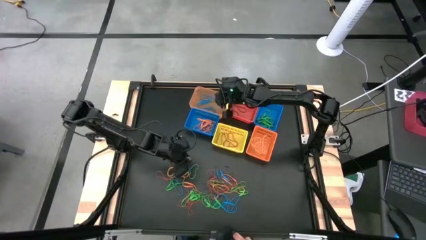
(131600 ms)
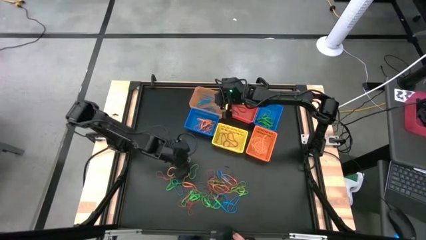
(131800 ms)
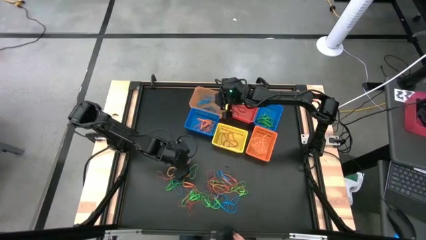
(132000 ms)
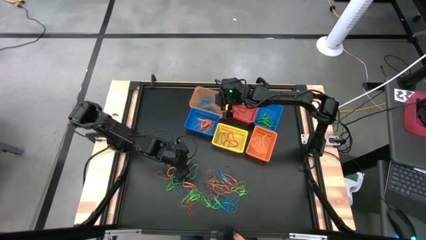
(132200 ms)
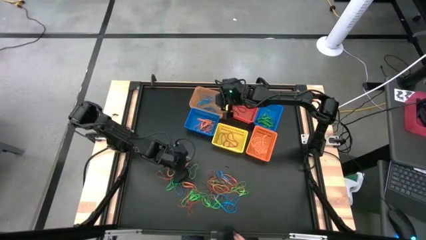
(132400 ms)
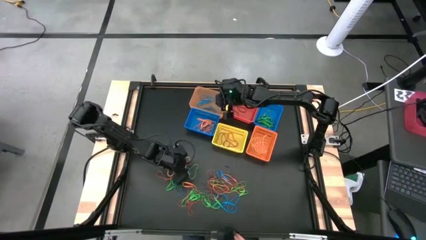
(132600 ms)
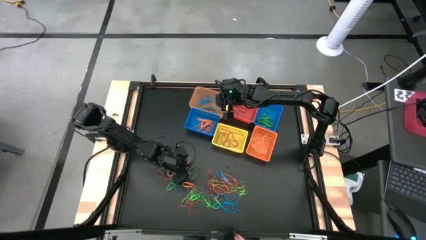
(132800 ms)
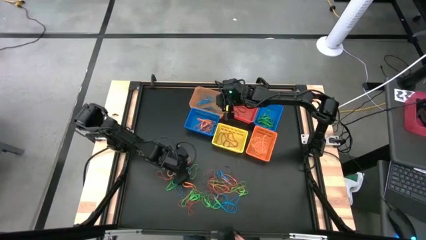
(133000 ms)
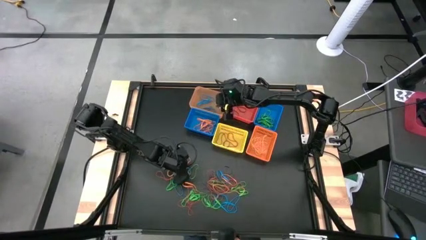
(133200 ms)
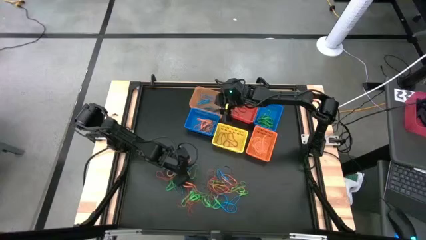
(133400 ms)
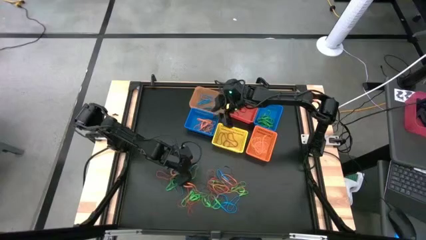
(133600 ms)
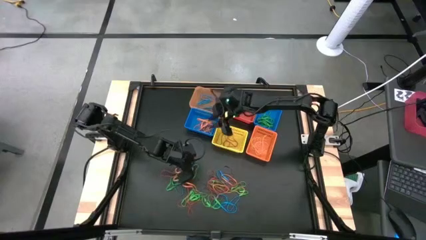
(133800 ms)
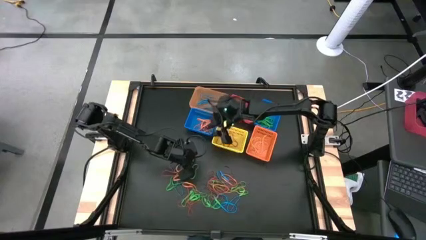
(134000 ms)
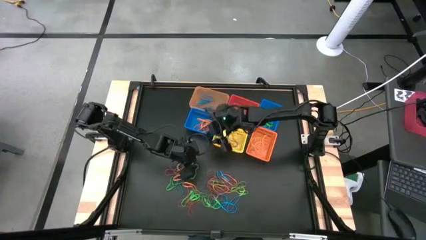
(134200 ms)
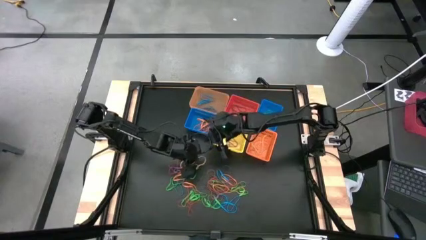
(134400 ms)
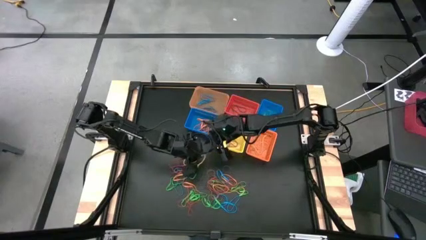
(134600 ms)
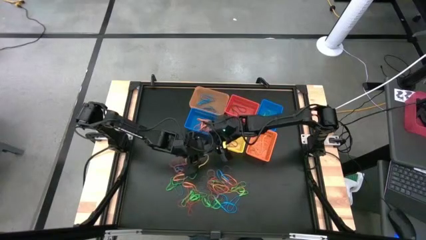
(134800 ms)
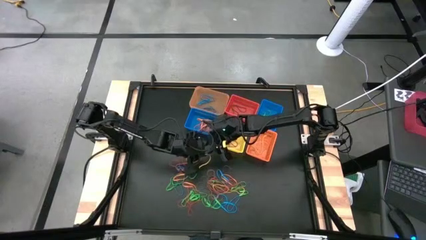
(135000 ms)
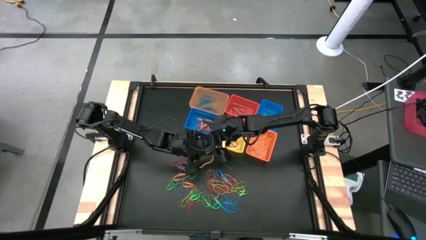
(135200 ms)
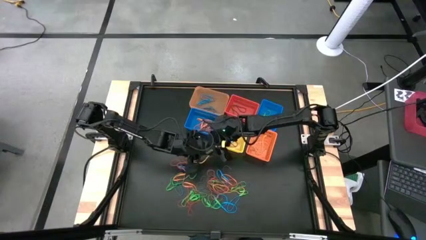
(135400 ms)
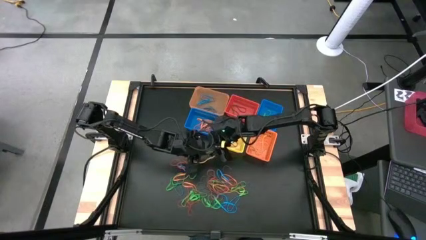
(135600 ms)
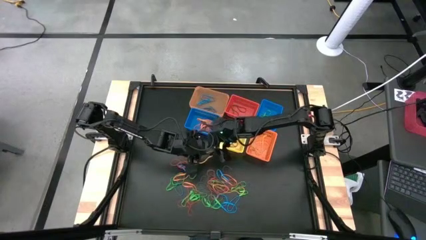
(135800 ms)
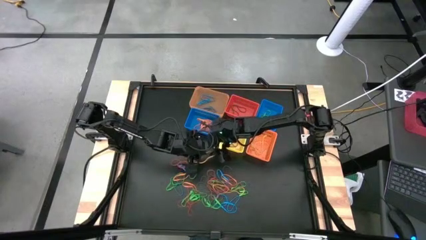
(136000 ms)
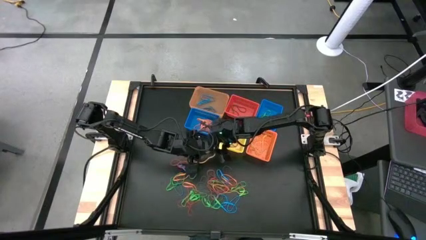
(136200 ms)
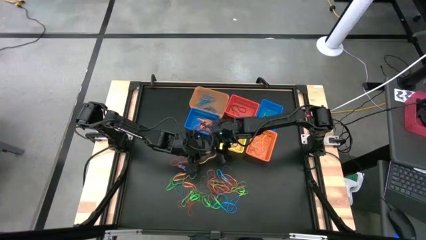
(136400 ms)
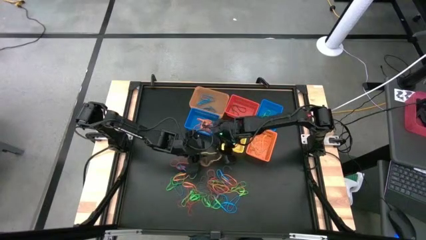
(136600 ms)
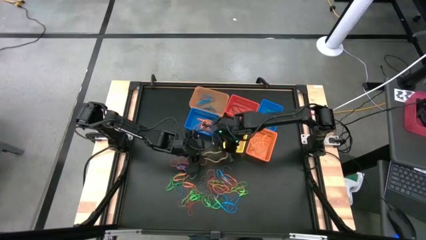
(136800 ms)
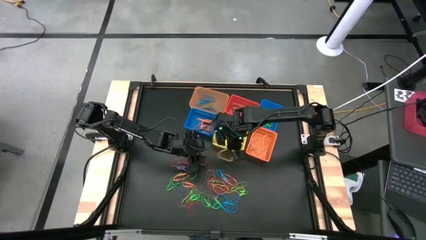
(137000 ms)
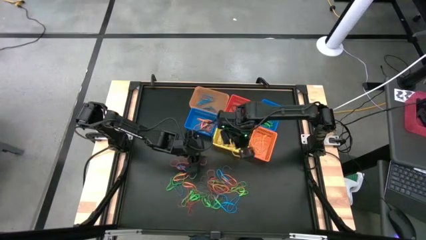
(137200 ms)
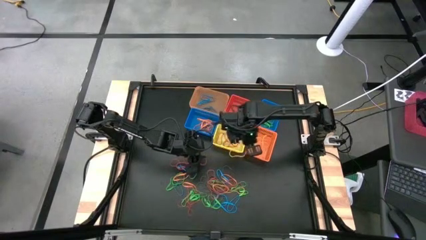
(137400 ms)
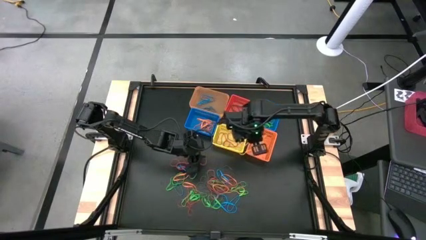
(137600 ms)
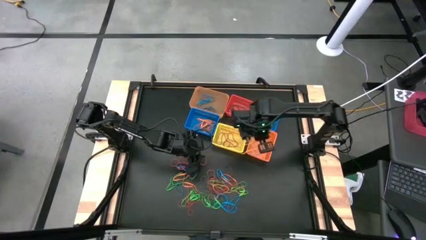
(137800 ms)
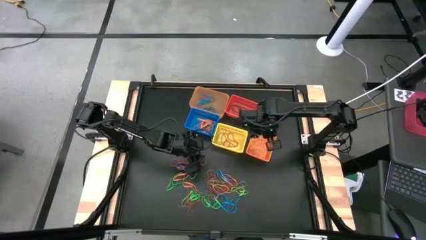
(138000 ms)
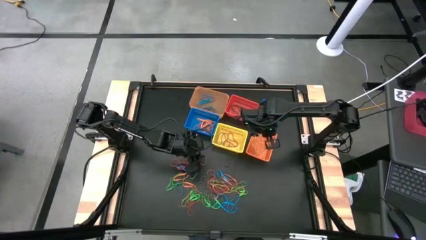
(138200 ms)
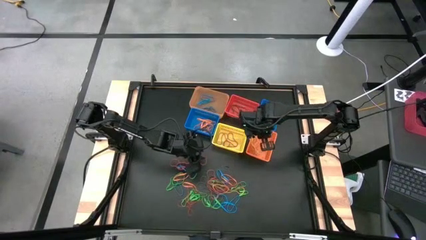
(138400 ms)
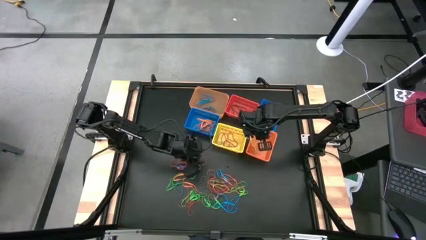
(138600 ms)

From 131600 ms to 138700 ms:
Task: Sort rubber bands into baskets
Put the yellow rubber band into the orange basket

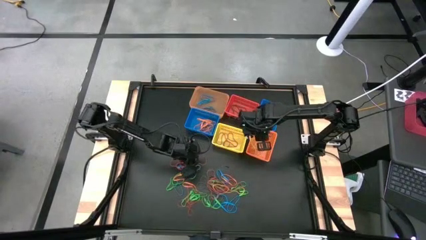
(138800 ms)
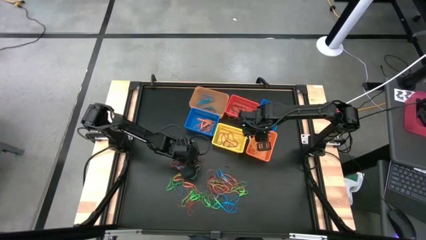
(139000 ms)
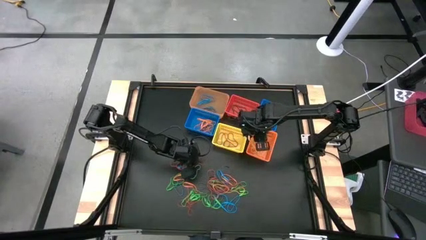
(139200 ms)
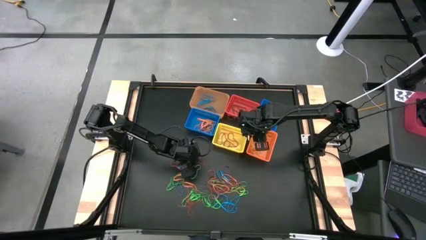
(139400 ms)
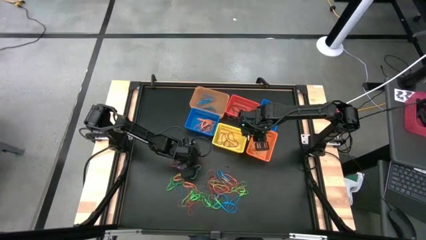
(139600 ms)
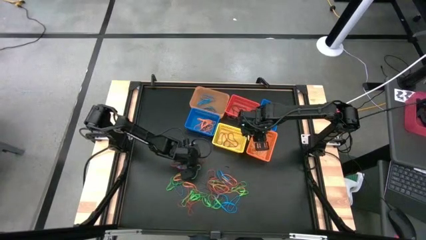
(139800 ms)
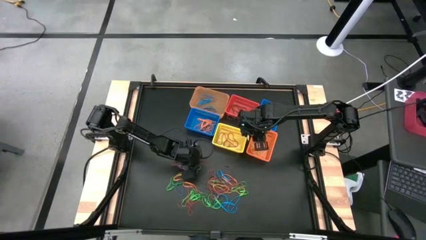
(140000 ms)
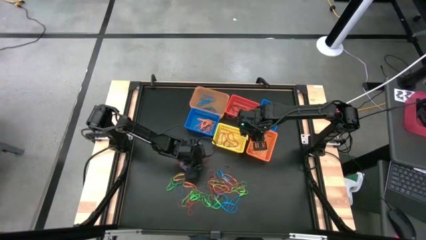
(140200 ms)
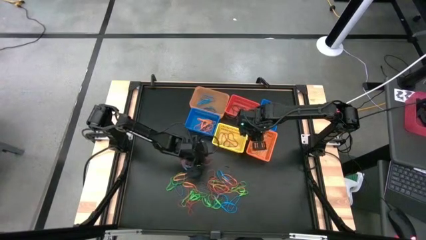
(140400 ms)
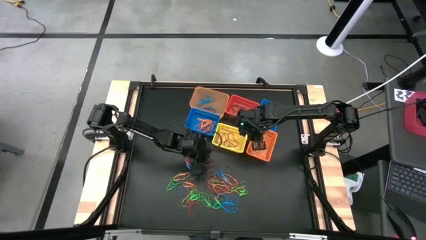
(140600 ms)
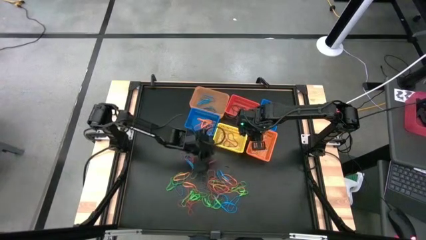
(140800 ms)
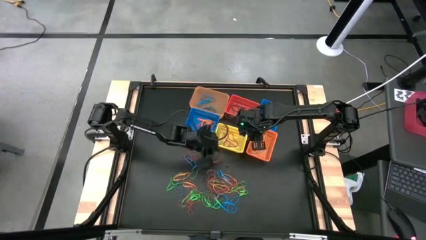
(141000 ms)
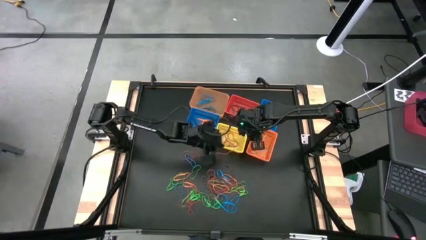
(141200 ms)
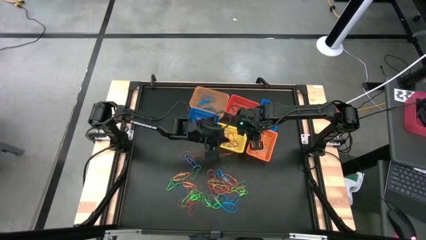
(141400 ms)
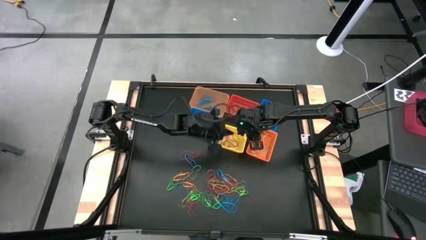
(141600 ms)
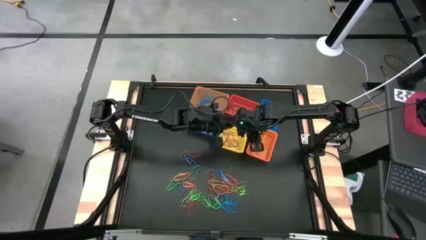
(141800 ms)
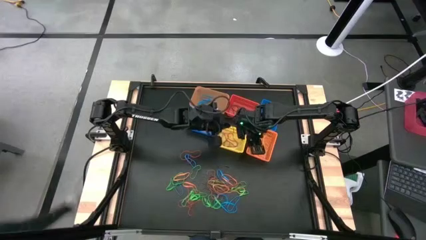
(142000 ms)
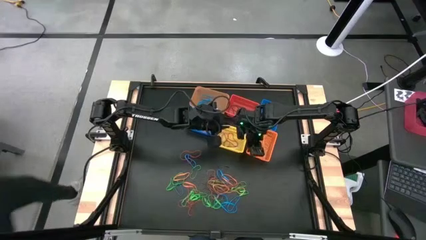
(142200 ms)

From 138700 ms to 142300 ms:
Put the red rubber band into the yellow basket

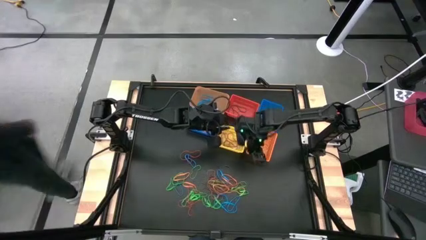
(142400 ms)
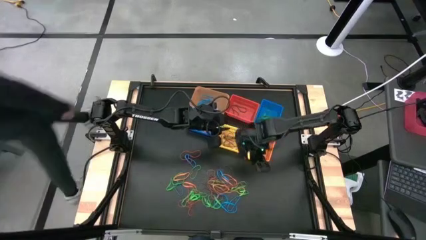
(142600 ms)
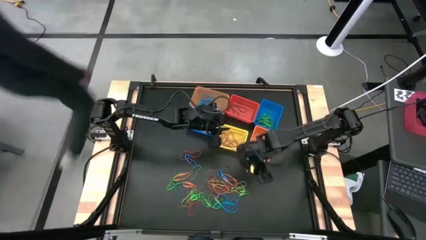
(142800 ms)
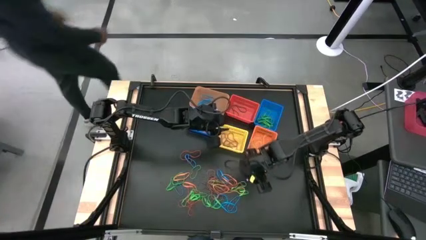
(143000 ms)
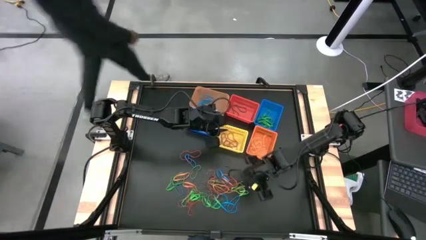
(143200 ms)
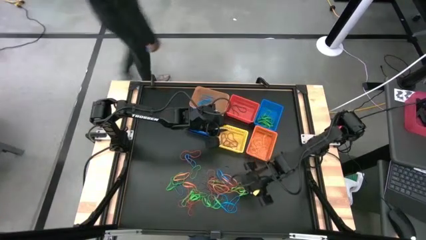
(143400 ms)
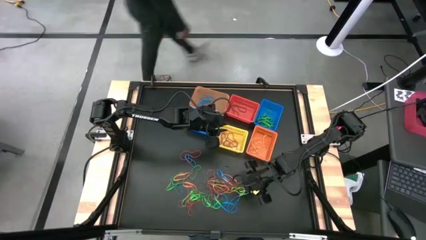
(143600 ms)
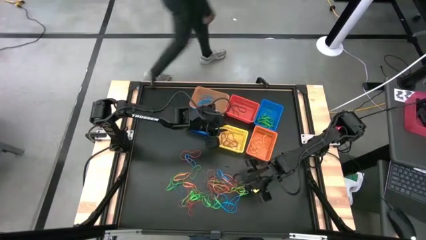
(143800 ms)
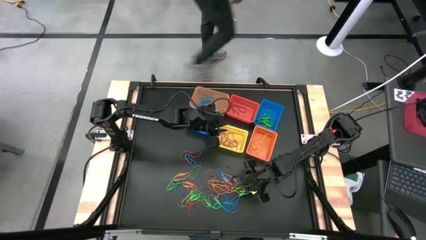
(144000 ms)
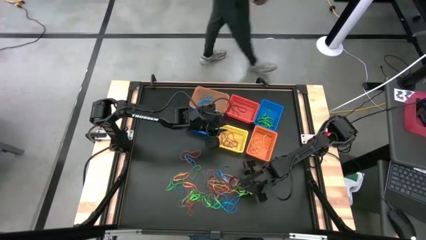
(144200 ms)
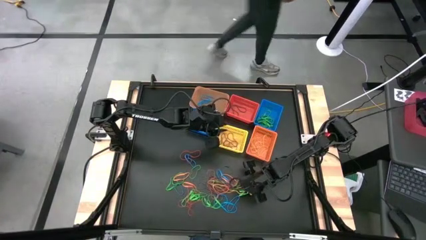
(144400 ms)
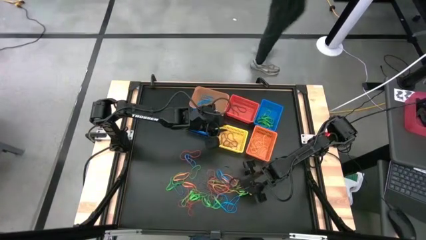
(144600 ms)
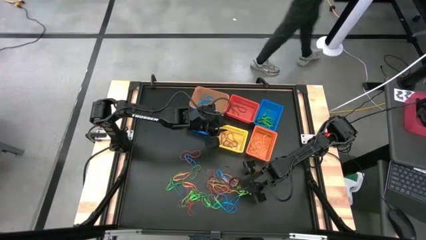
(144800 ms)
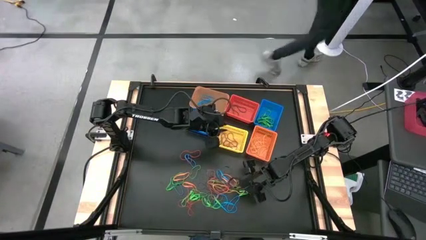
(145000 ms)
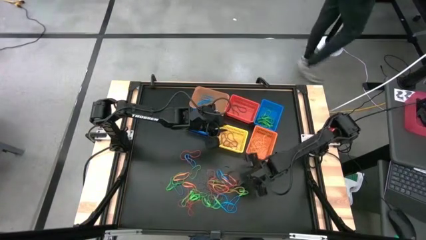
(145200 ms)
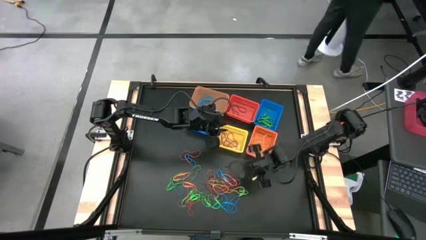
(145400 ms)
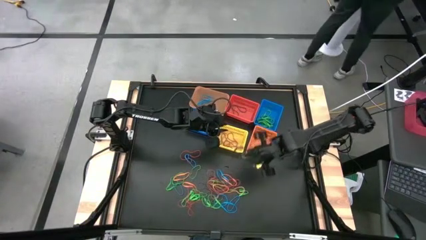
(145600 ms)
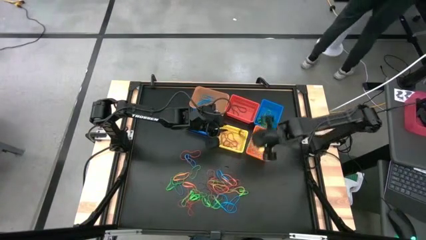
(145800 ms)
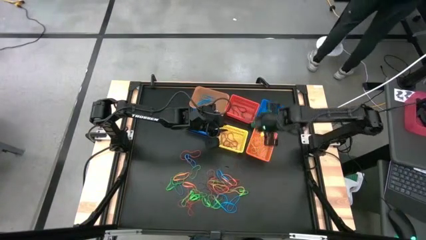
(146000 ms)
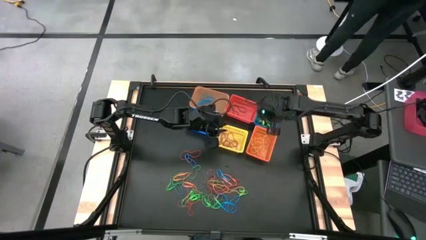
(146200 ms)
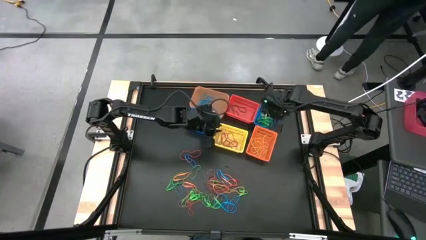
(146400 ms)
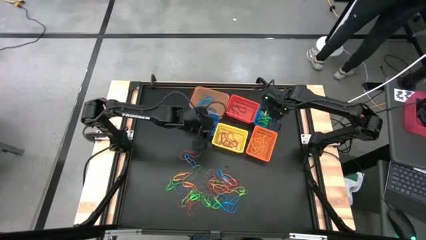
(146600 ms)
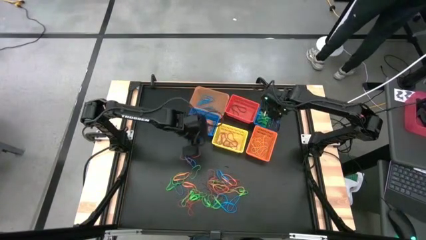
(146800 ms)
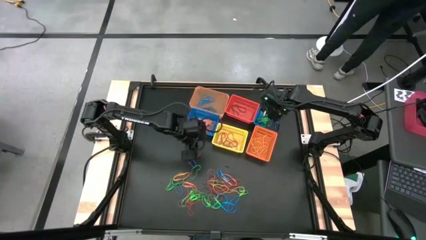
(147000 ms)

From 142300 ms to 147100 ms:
Put the green rubber band into the right blue basket

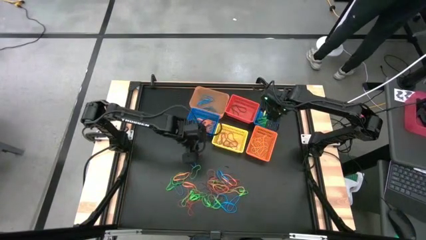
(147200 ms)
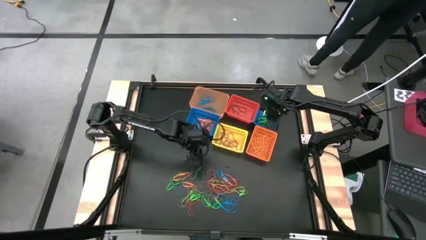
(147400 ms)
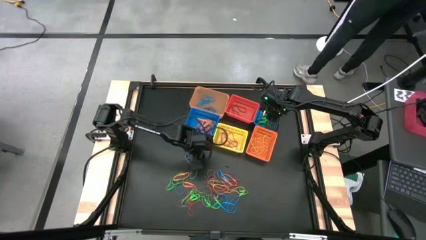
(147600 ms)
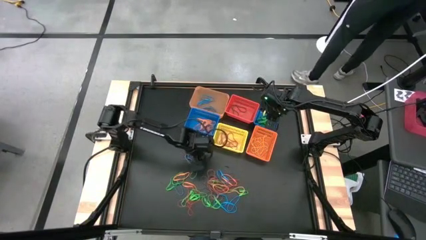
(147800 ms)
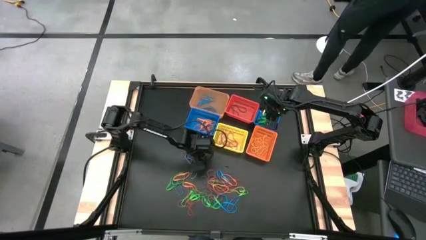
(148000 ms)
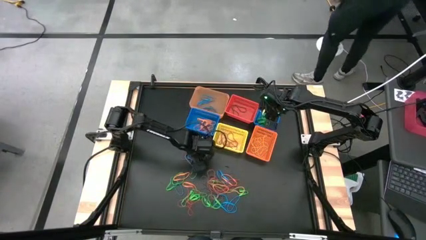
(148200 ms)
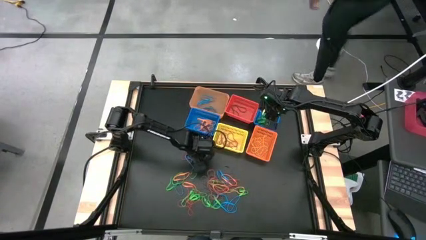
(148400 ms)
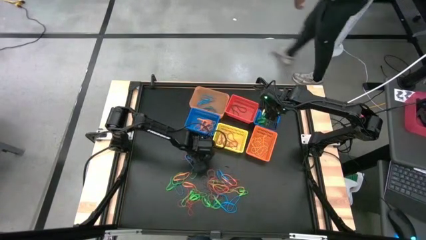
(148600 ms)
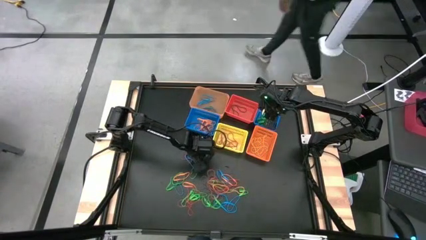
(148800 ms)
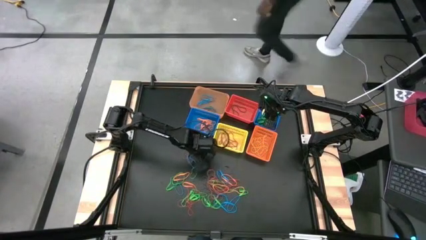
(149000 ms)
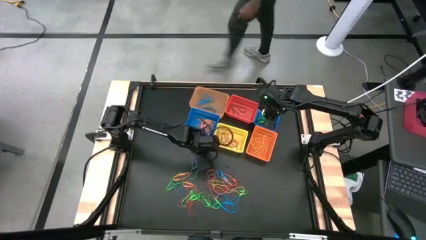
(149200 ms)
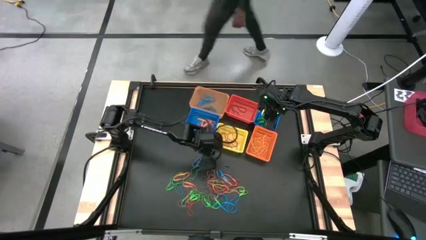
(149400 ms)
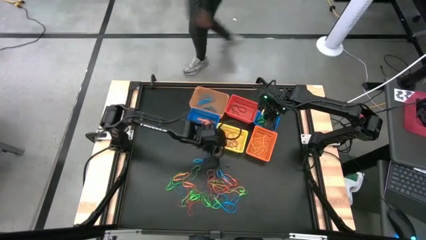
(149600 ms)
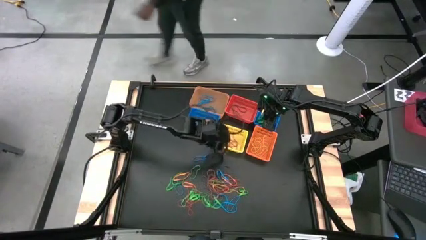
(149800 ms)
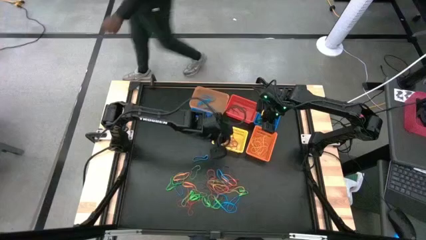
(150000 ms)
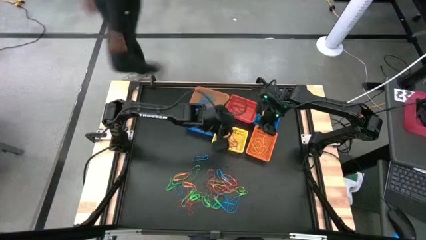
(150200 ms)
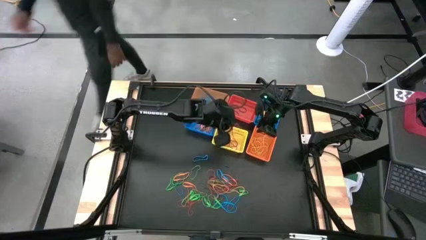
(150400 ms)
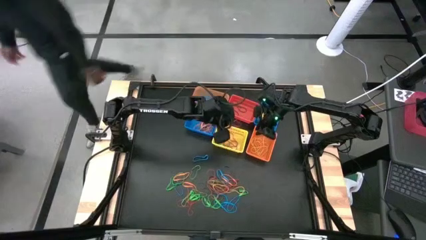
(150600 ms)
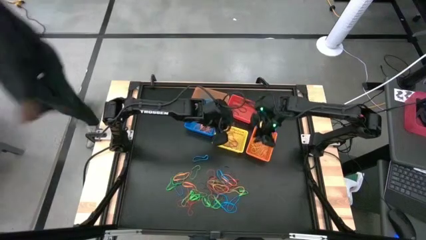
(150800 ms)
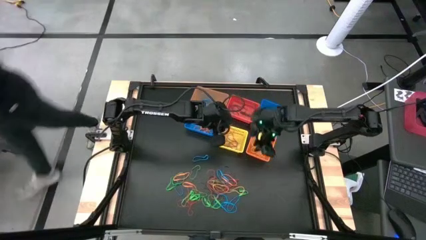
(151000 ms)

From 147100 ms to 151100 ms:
Put the green rubber band into the right blue basket
